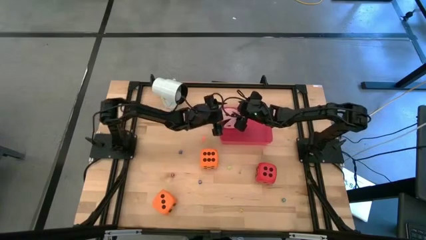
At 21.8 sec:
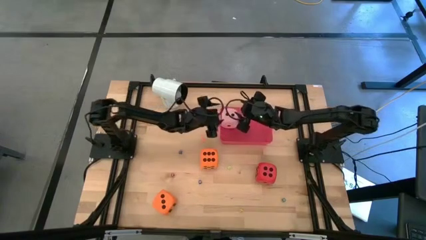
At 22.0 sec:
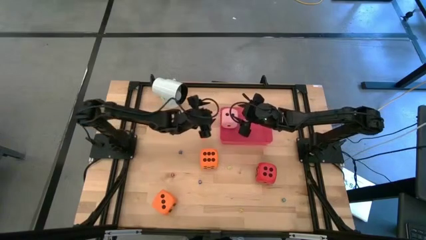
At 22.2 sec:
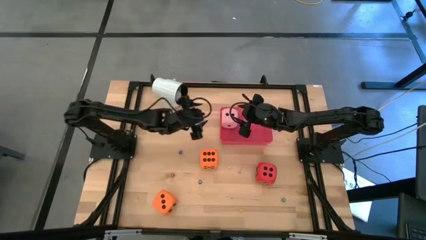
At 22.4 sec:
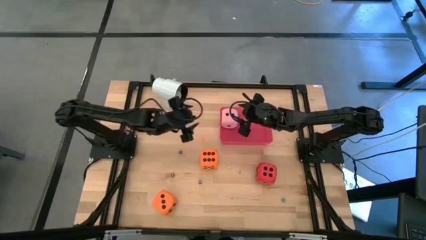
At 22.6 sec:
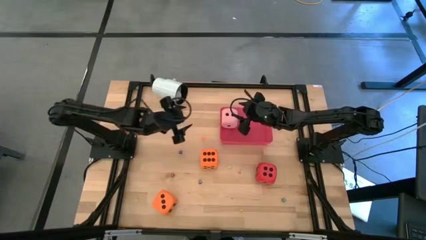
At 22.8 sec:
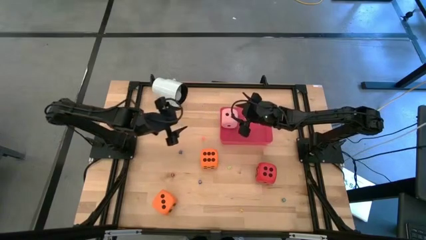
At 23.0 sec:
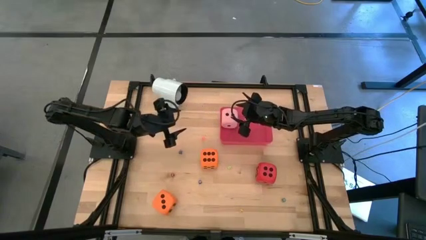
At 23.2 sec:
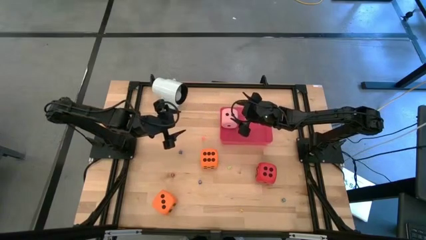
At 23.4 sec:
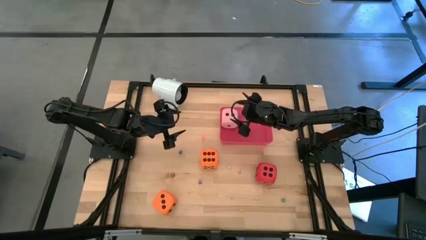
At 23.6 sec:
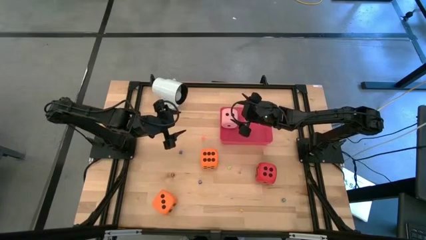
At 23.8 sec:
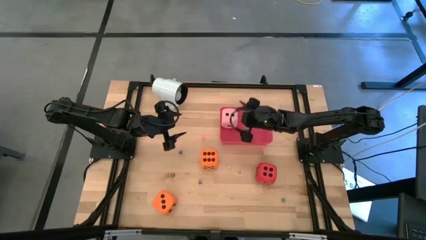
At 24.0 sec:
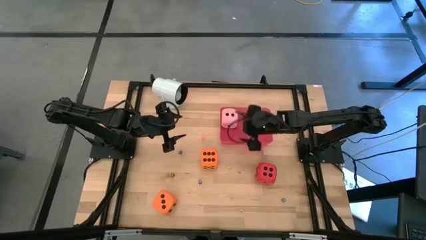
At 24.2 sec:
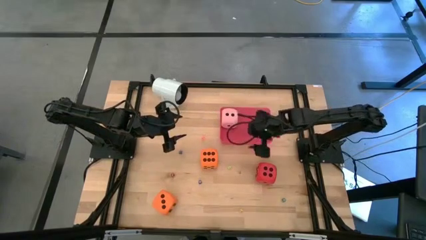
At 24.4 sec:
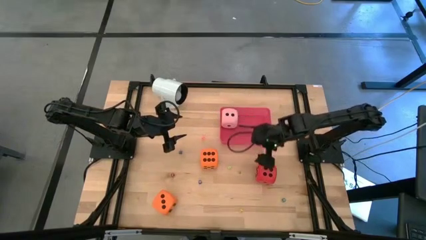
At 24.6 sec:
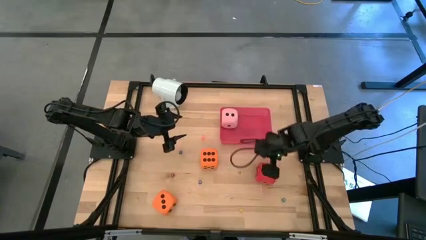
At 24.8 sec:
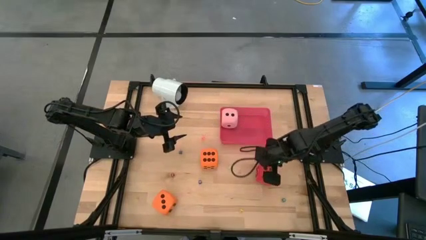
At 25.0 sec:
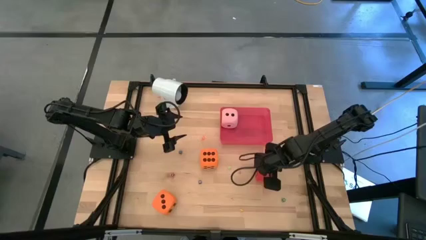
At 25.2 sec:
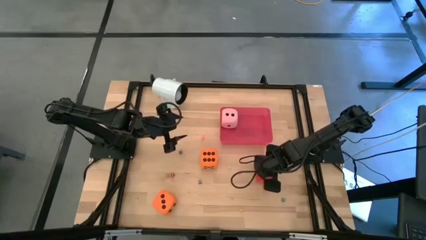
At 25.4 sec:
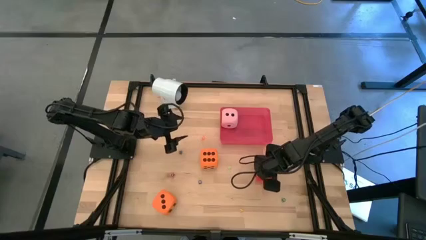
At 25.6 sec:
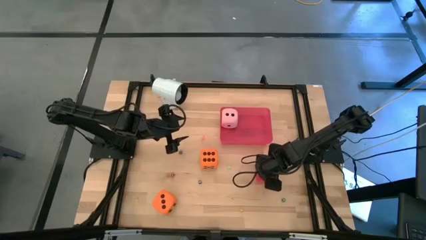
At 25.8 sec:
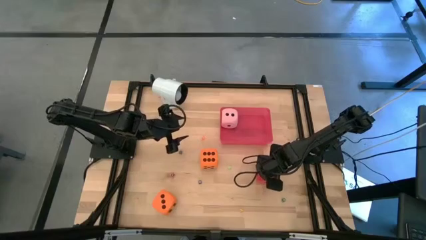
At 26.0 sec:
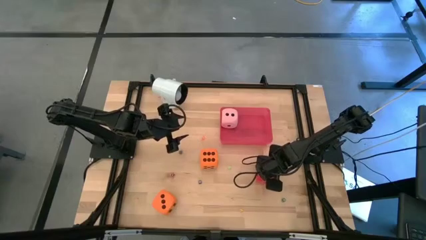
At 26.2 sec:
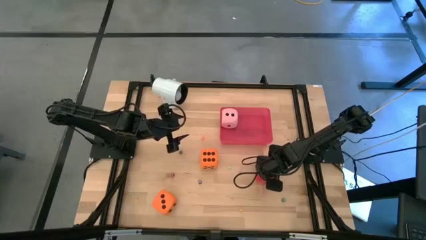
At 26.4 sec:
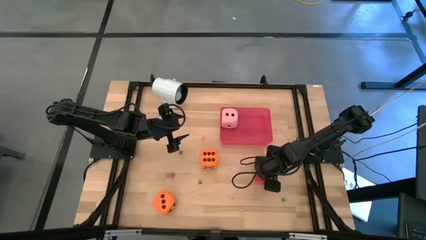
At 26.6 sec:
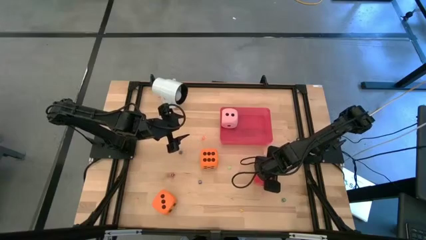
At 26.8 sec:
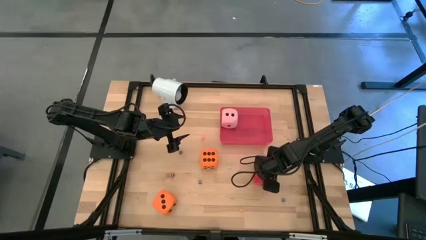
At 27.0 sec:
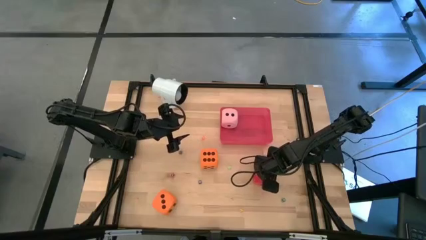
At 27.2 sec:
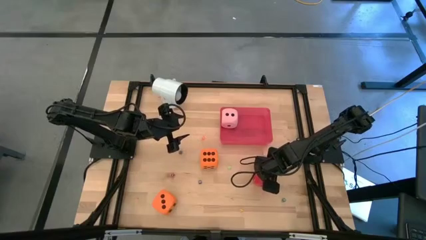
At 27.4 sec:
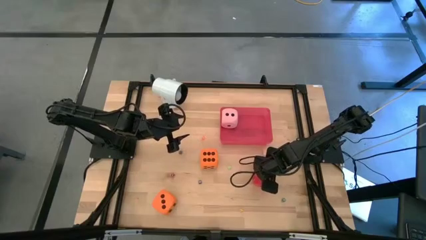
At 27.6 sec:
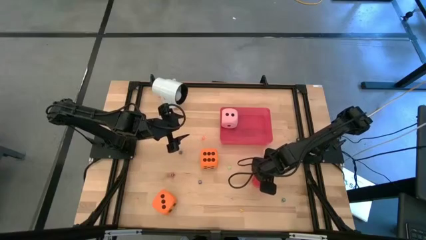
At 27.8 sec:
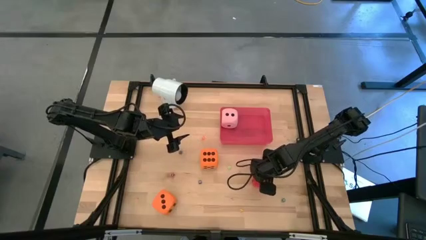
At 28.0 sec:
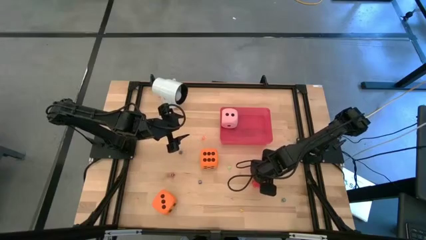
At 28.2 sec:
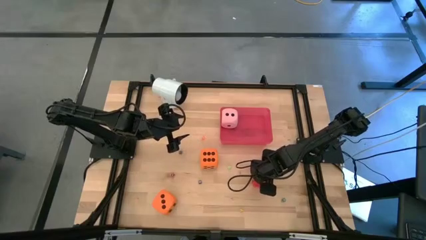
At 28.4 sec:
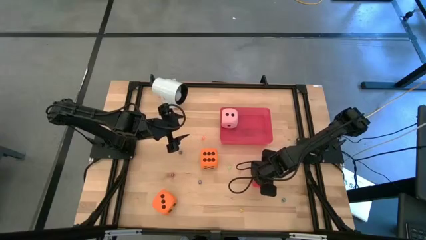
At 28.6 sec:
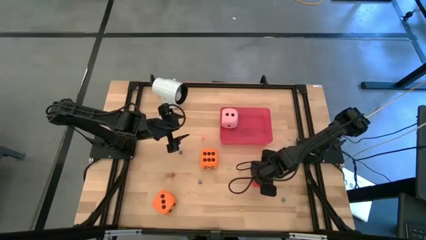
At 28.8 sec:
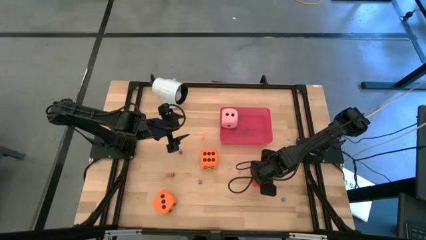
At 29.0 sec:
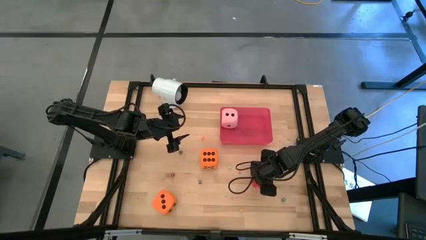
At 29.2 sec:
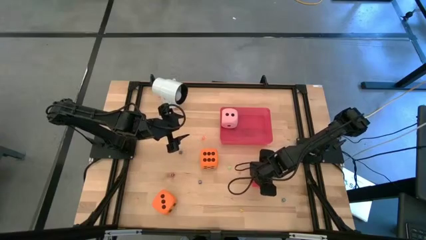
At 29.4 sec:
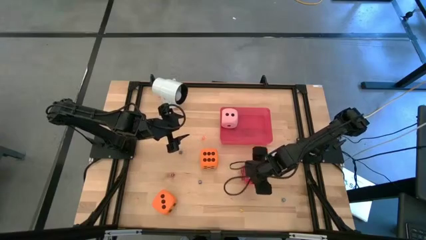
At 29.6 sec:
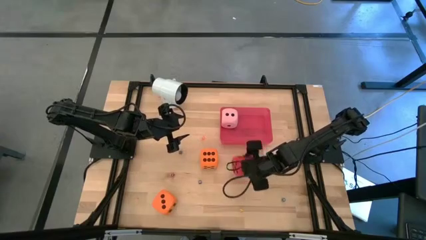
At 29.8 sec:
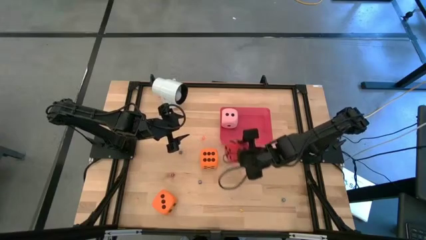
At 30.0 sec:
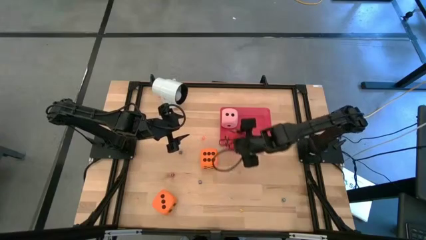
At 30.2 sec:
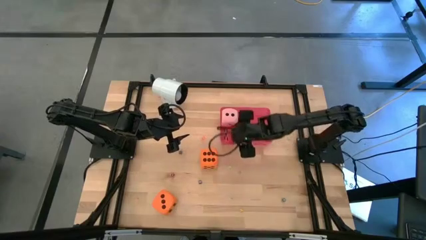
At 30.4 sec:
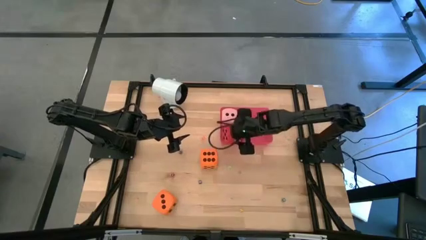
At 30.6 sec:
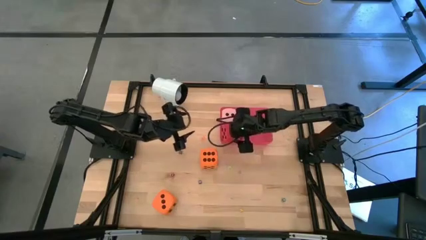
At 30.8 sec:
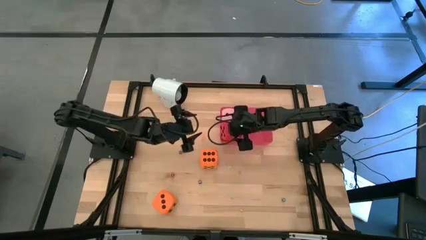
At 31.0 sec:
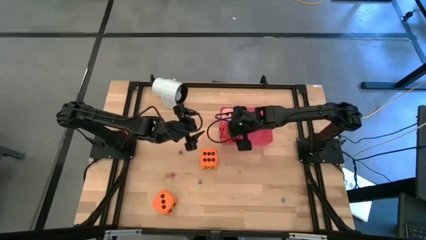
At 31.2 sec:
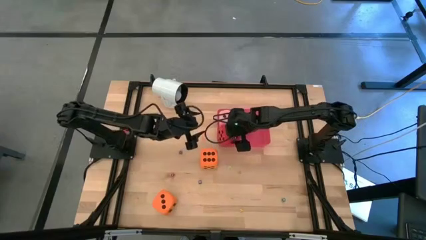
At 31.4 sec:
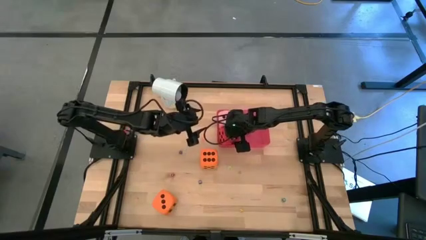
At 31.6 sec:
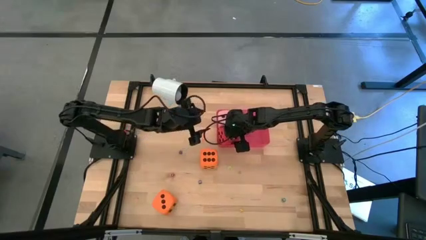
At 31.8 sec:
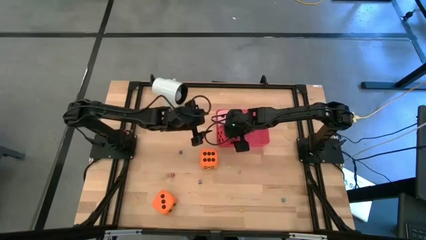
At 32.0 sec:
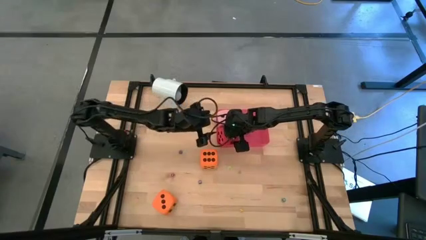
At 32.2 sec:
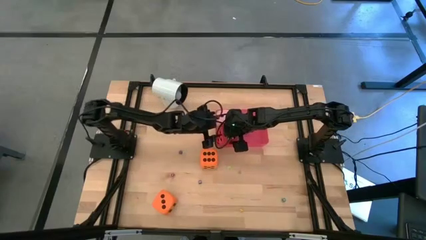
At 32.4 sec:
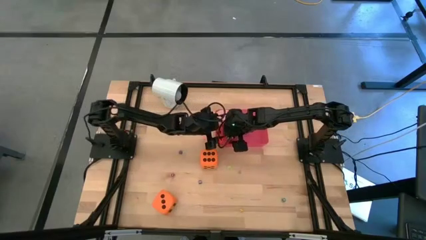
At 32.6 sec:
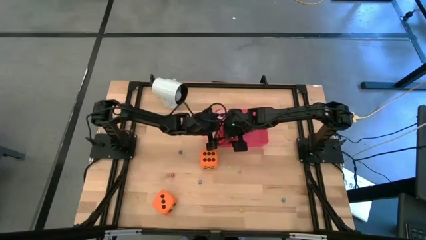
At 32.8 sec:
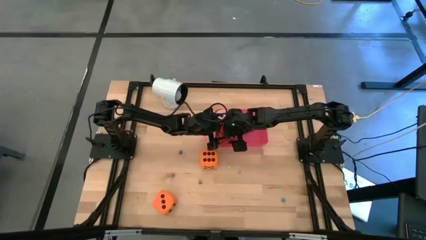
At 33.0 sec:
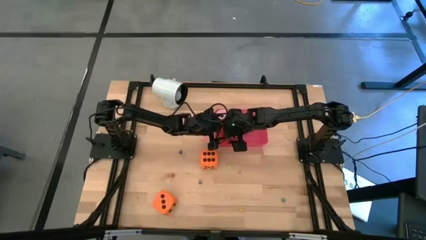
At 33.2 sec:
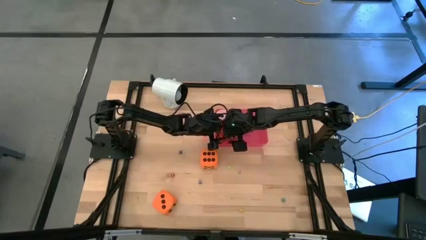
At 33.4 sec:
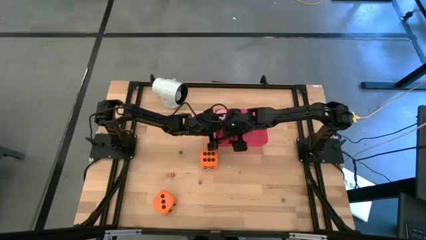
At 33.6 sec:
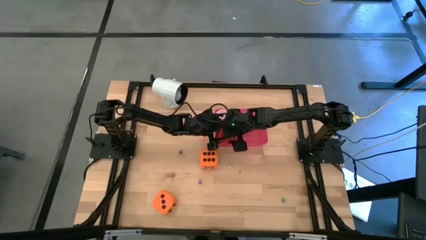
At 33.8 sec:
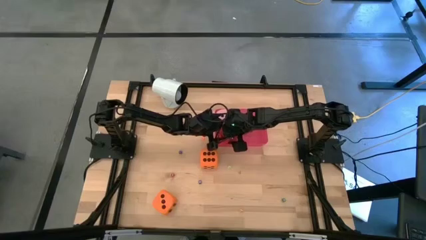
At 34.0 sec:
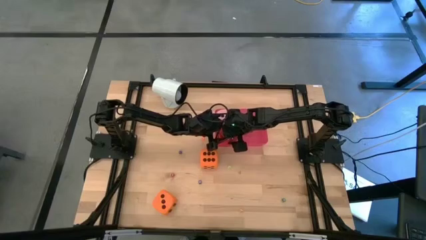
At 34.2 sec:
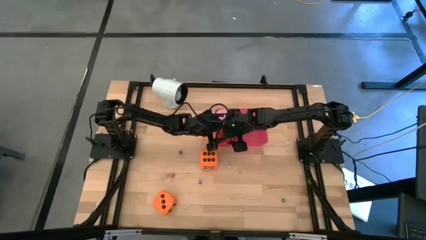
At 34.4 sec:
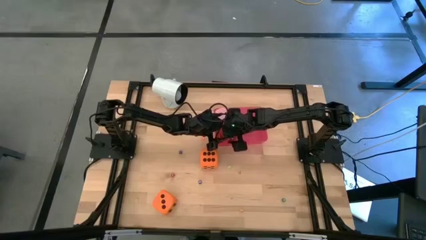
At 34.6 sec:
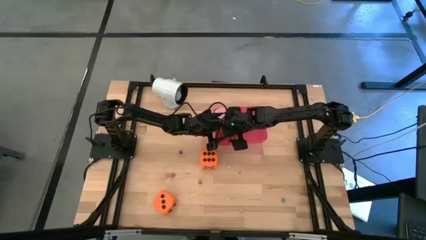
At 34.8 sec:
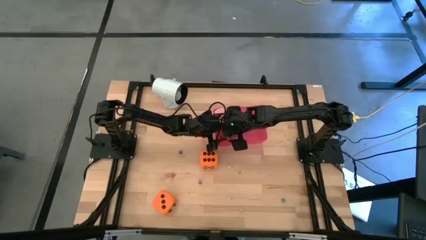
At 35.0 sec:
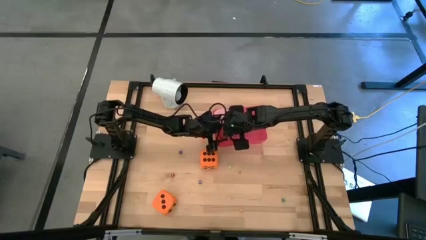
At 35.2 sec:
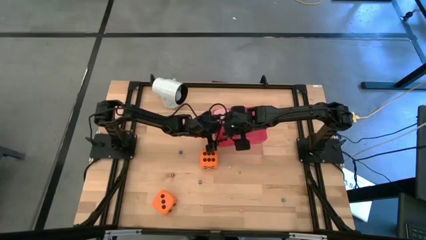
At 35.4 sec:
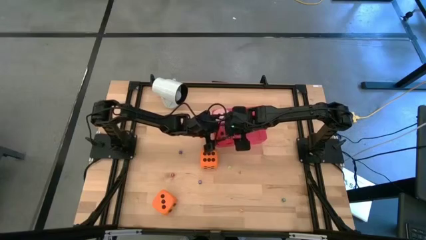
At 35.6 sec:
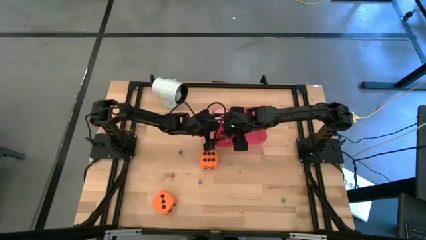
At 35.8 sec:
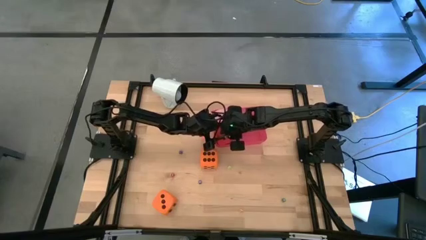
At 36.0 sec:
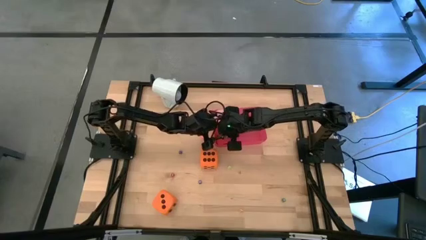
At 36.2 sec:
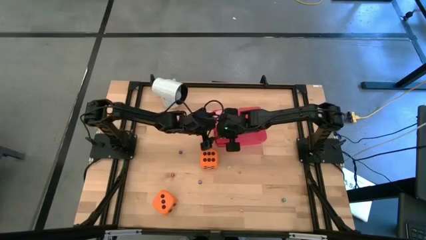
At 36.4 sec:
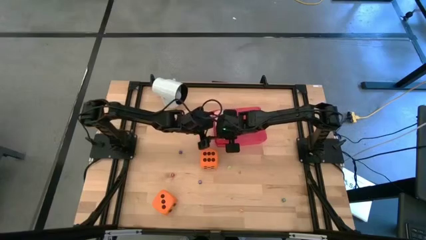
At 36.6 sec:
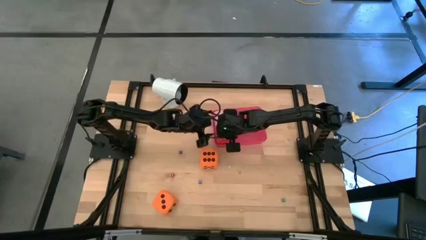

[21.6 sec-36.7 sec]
Task: Pick & Place Dice
Put the big red dice into the red bin
